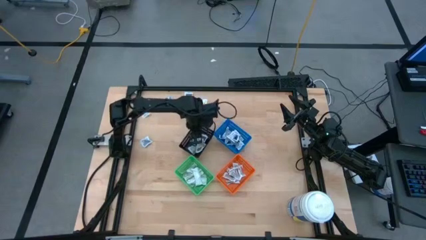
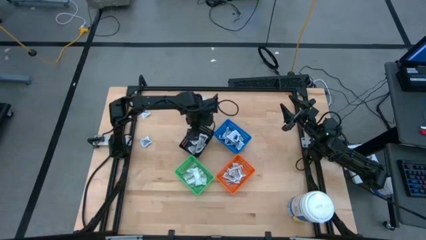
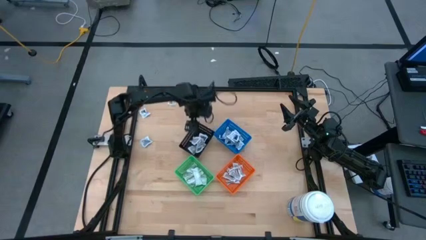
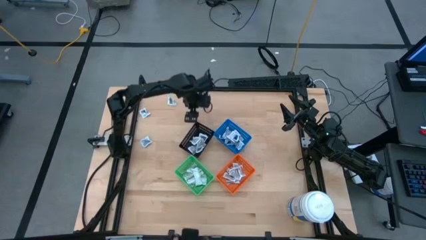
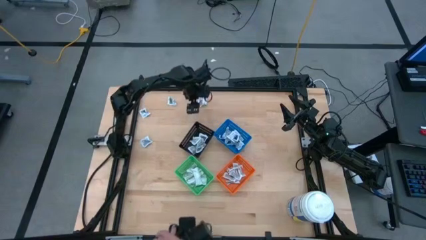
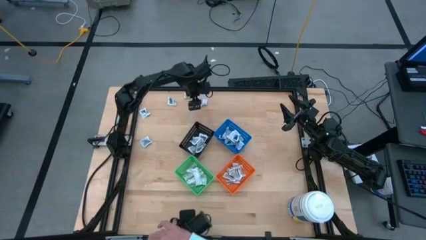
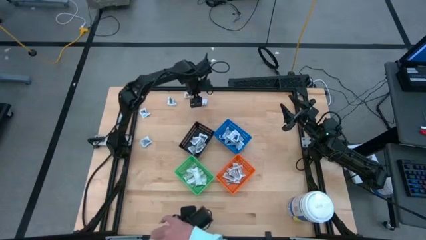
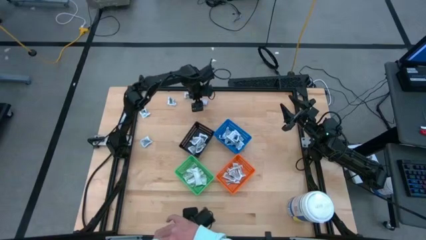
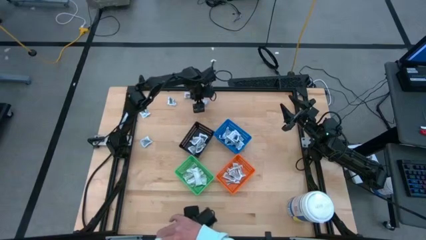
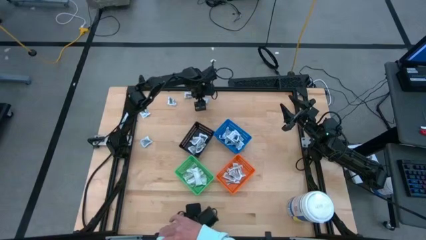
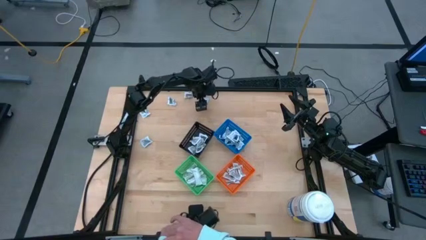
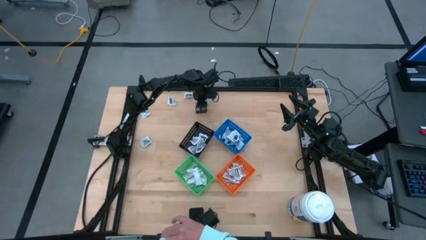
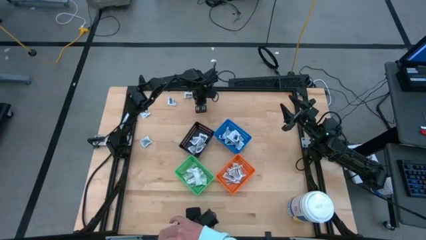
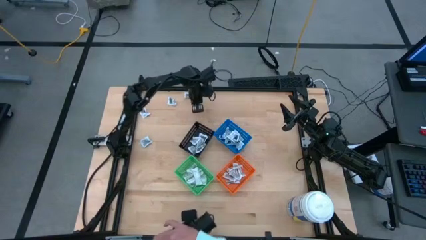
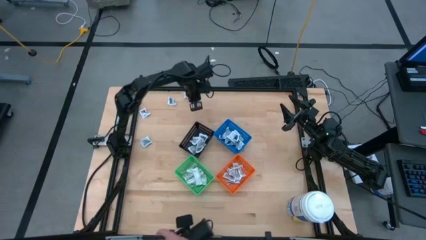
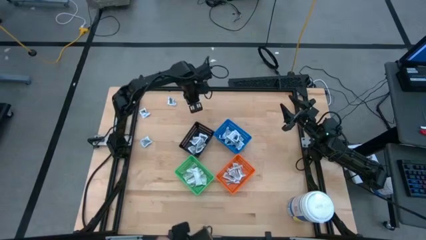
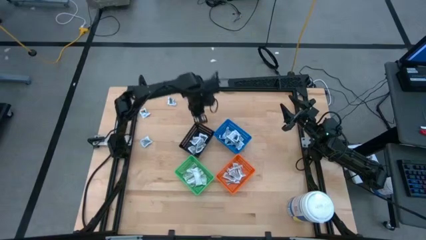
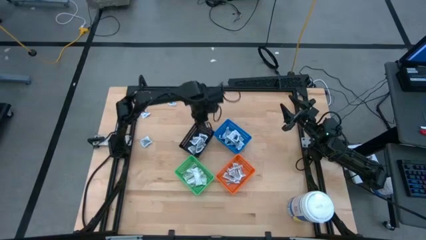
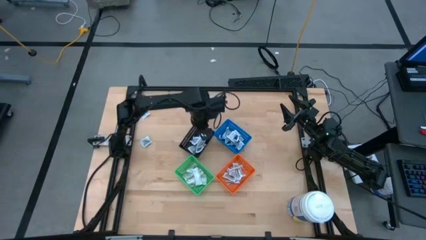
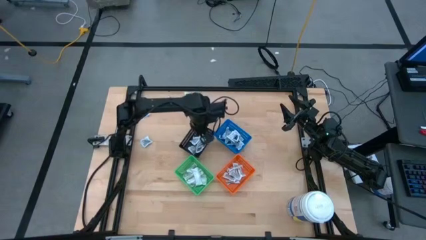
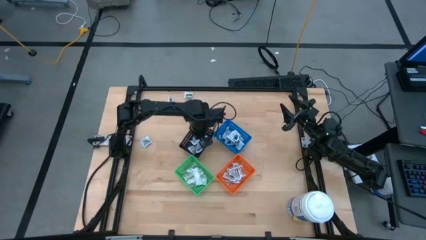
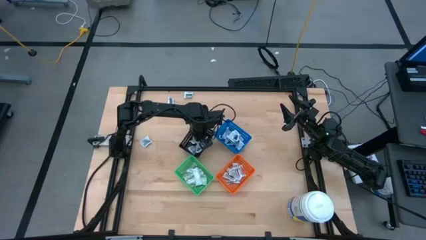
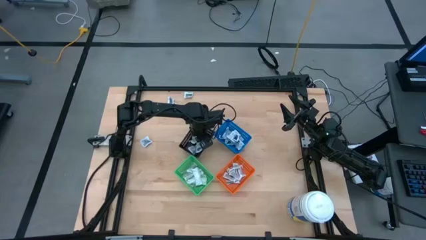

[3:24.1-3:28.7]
Task: Pick & Place First Aid Supplies
Put the black towelette pack into the black bin

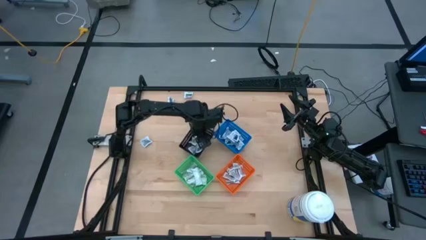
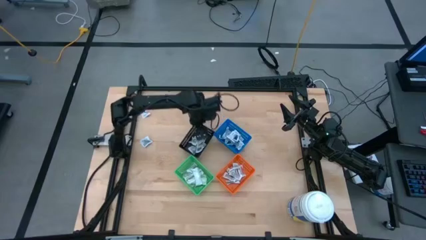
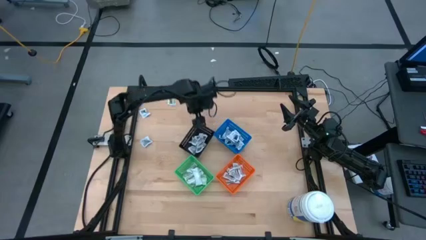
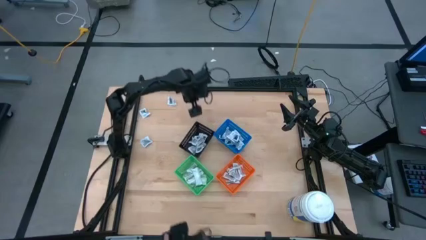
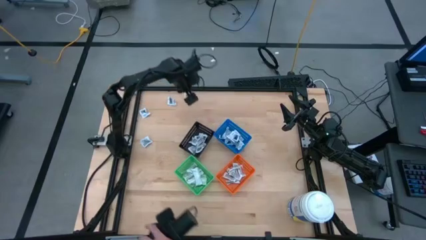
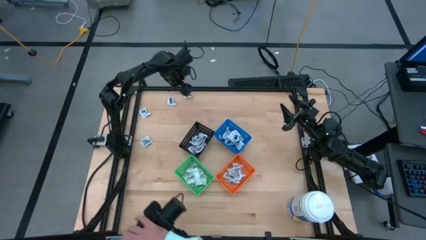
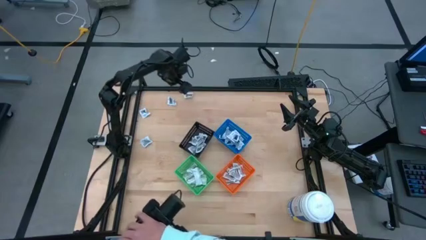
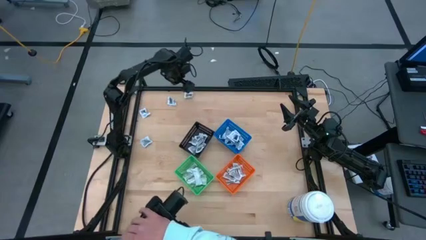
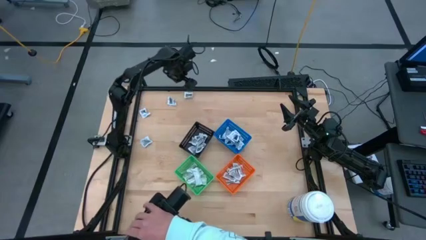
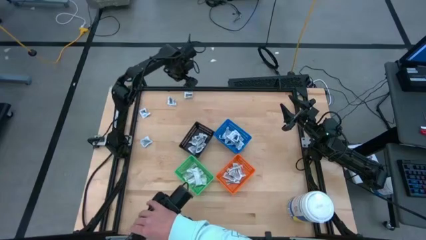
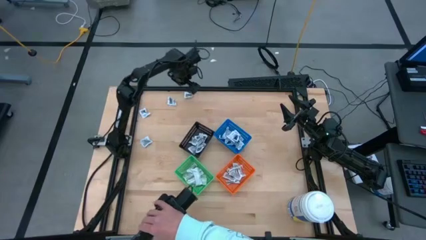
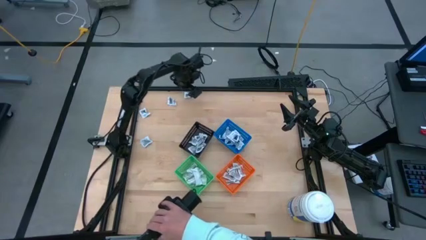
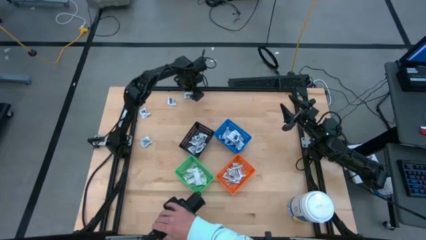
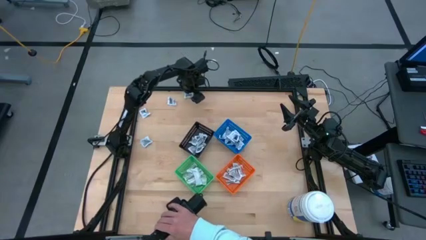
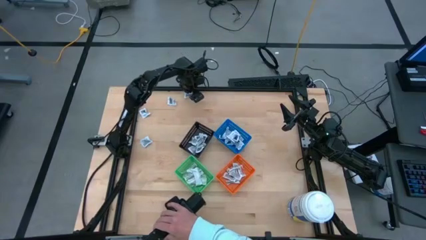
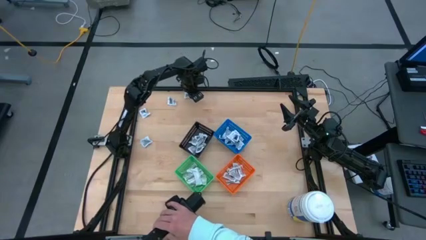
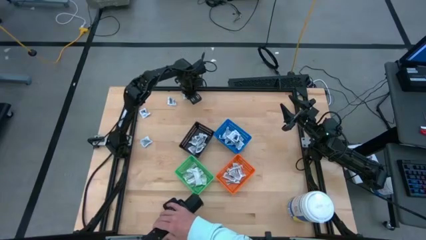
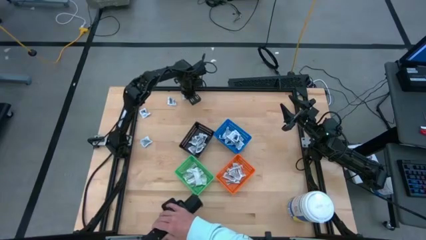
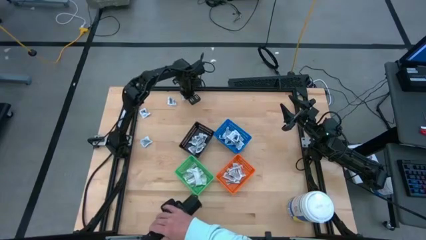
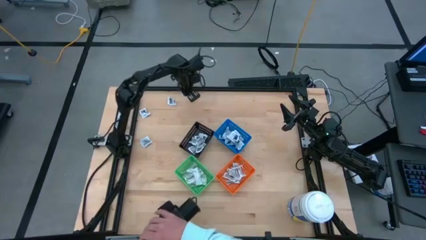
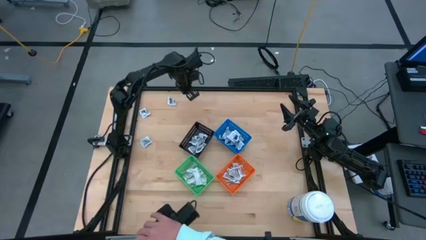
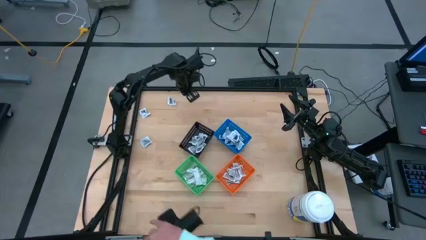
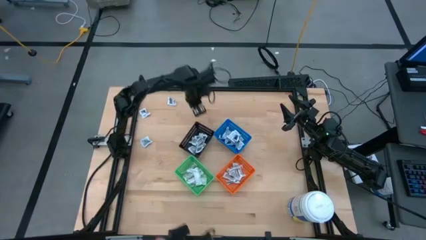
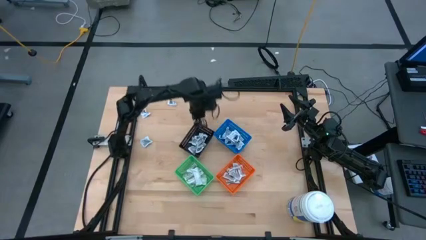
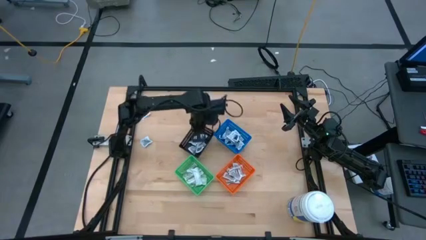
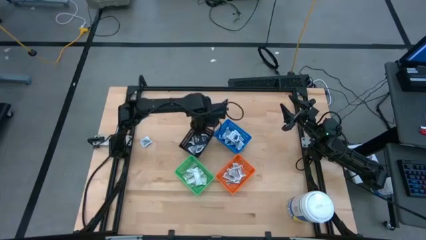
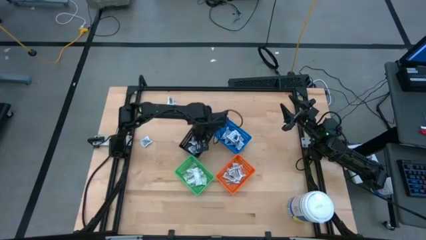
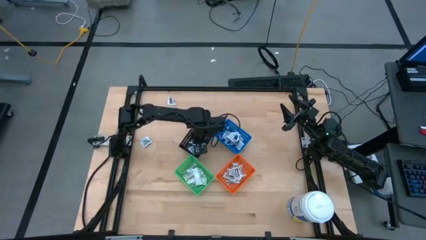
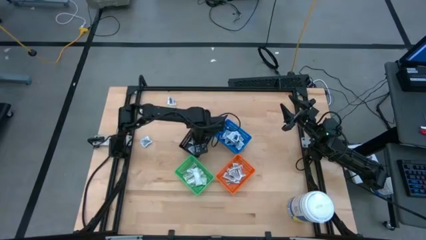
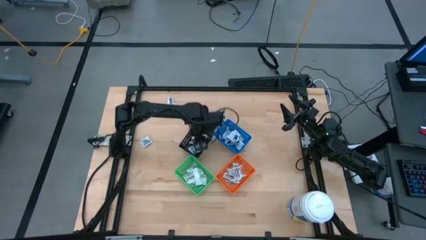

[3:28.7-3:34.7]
Put the black towelette pack into the black bin

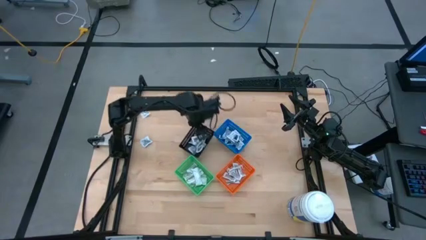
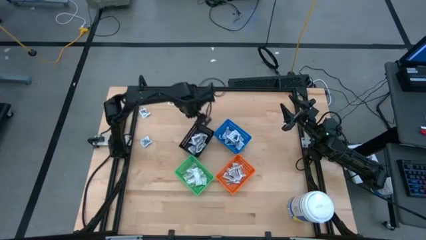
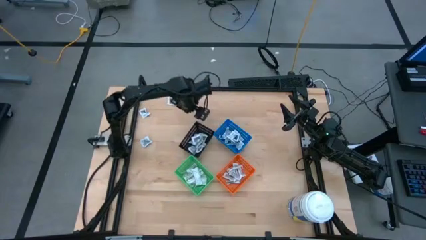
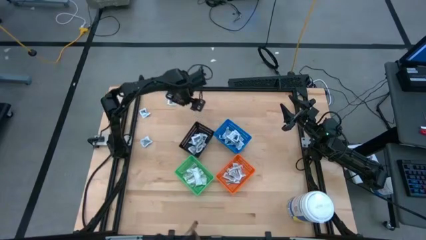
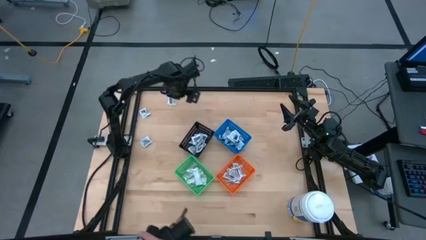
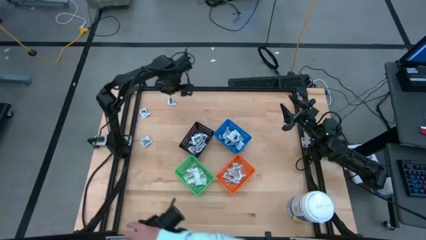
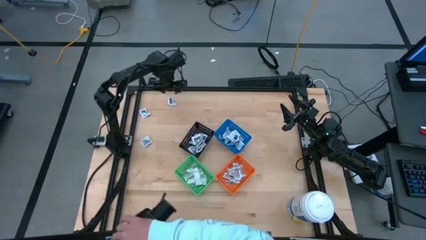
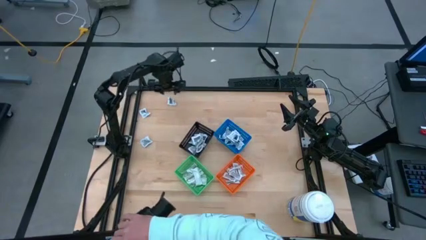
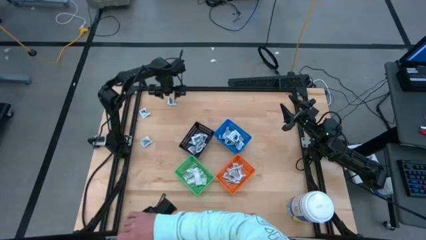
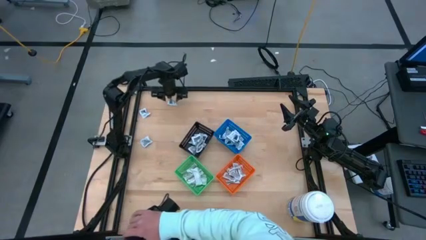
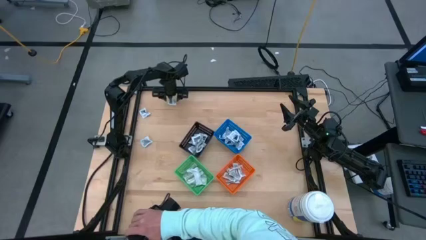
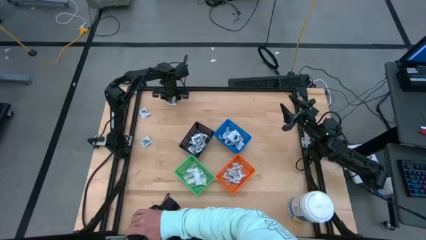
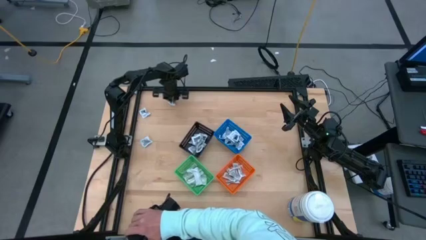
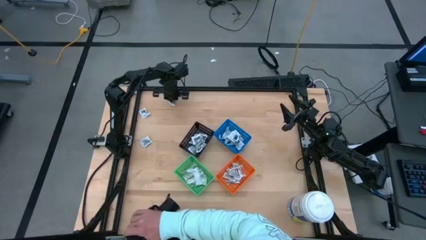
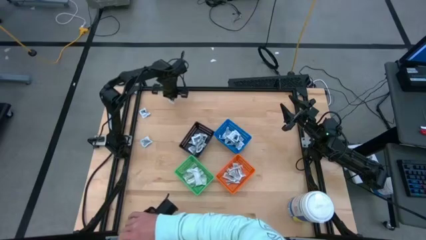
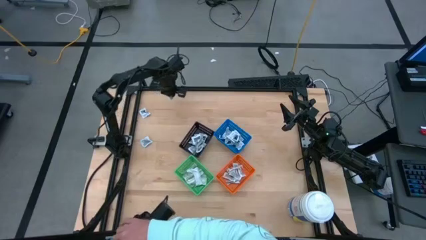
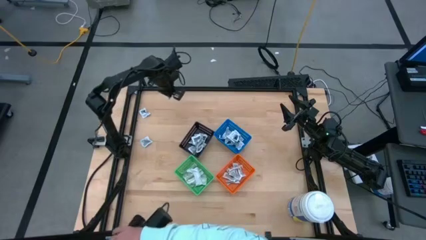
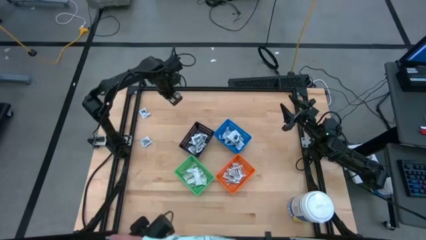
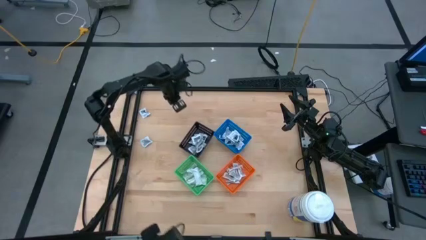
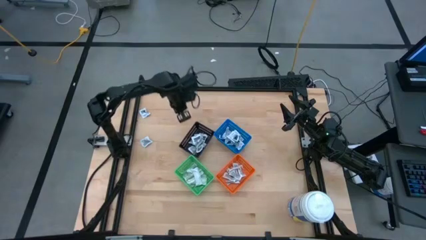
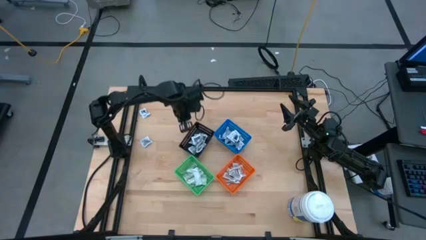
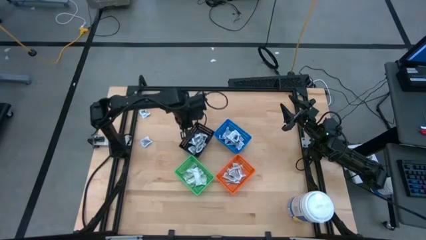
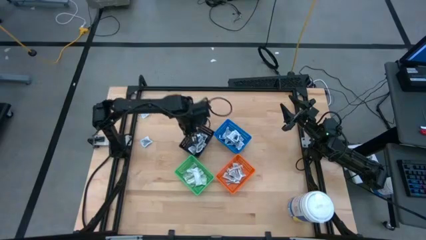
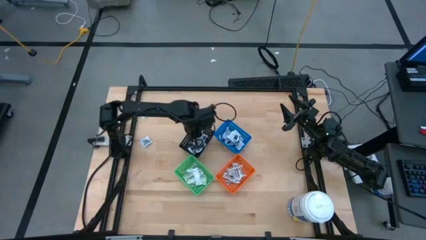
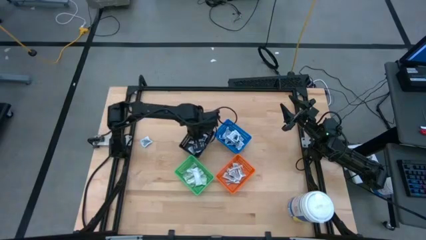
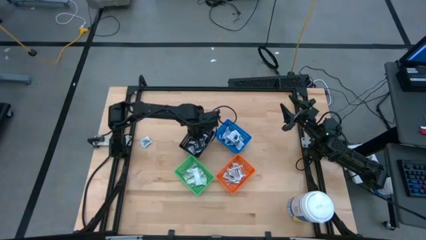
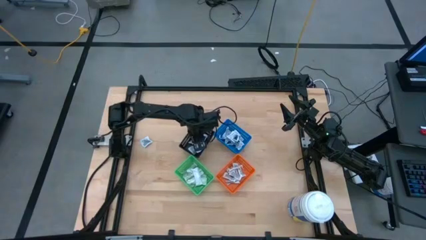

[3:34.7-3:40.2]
Put the black towelette pack into the black bin
